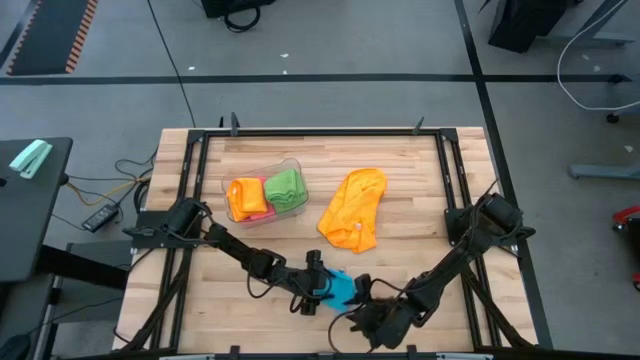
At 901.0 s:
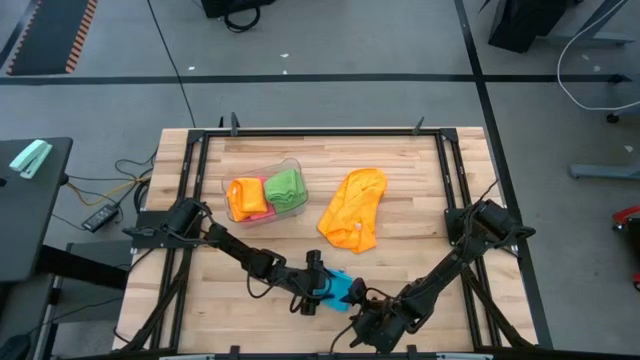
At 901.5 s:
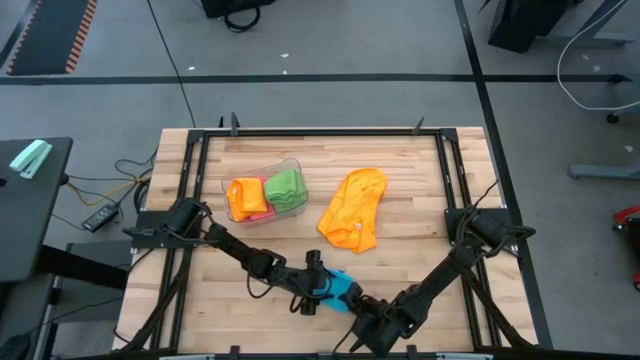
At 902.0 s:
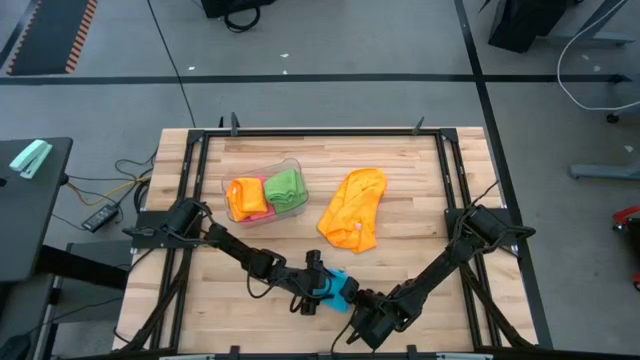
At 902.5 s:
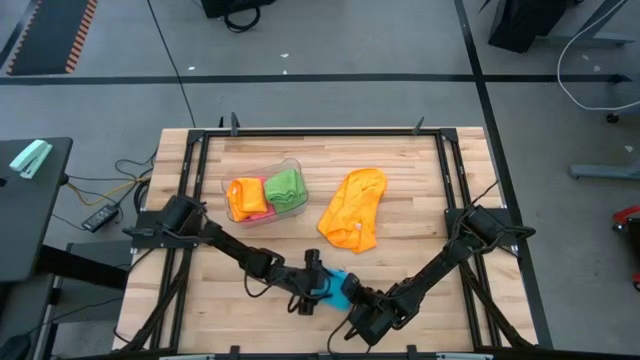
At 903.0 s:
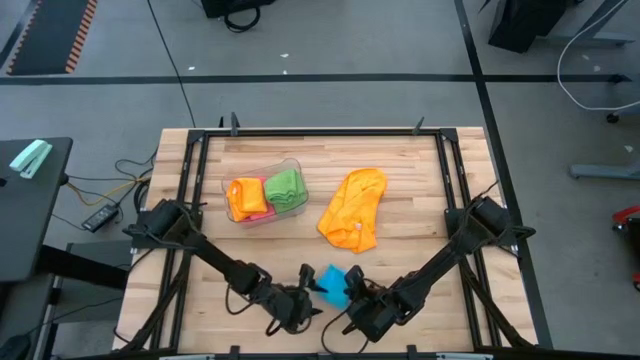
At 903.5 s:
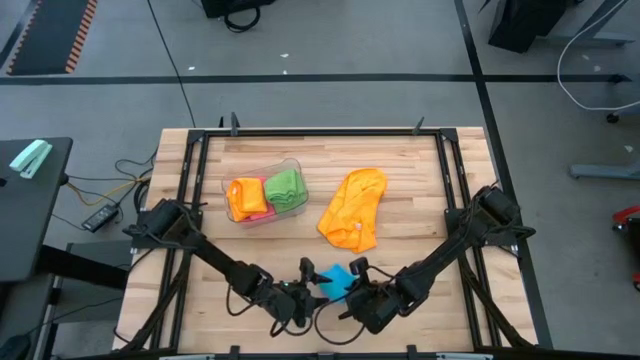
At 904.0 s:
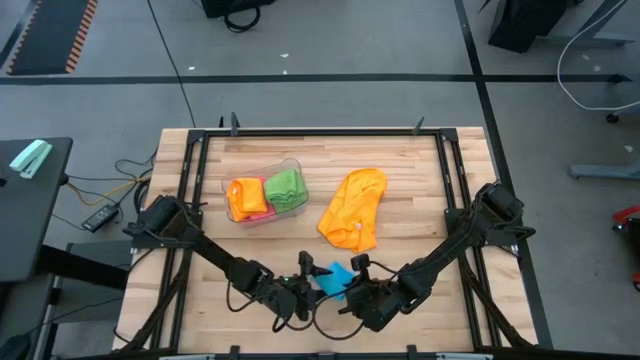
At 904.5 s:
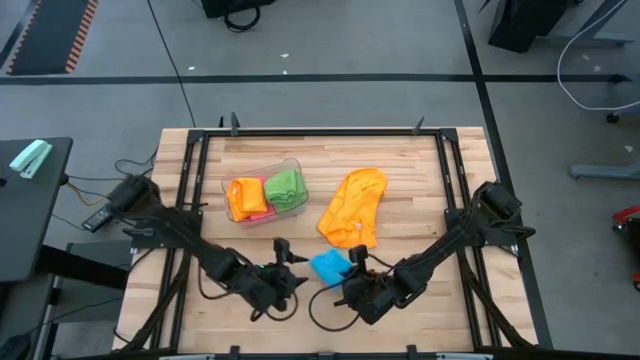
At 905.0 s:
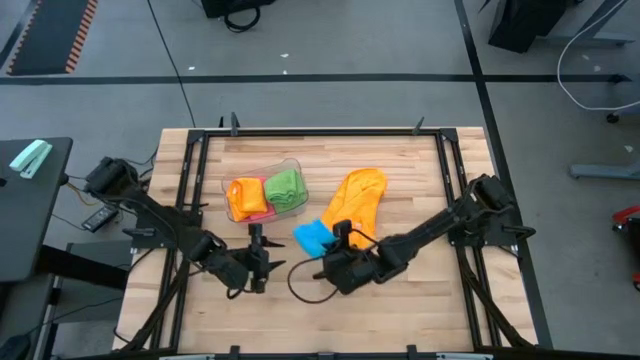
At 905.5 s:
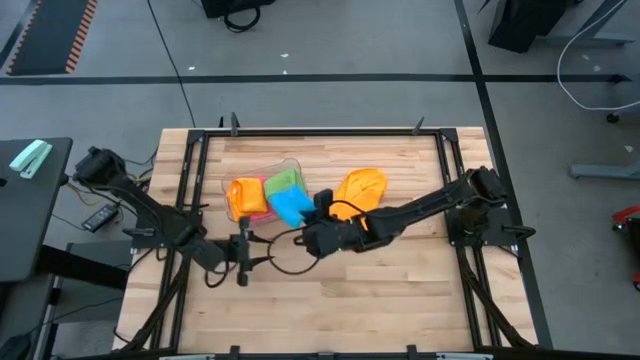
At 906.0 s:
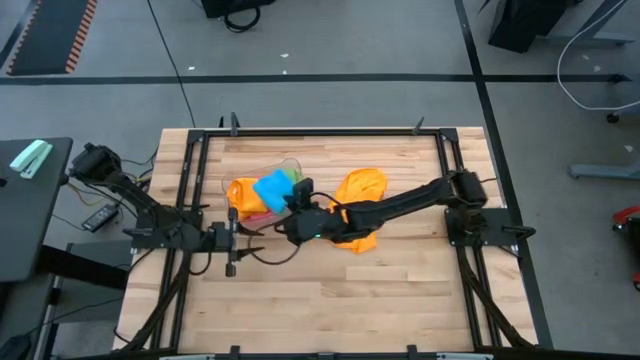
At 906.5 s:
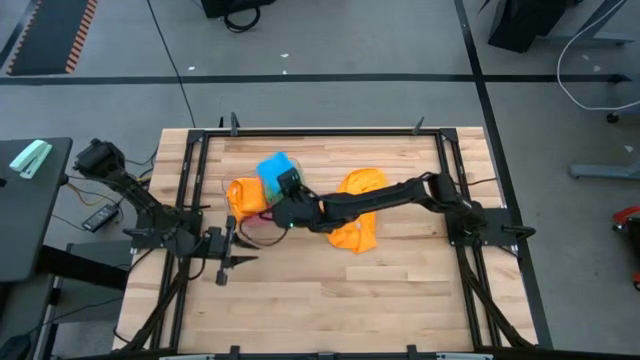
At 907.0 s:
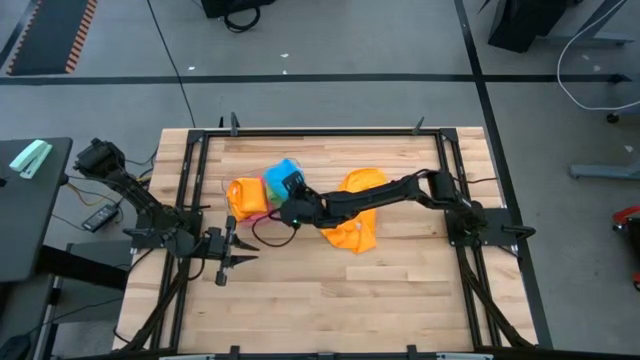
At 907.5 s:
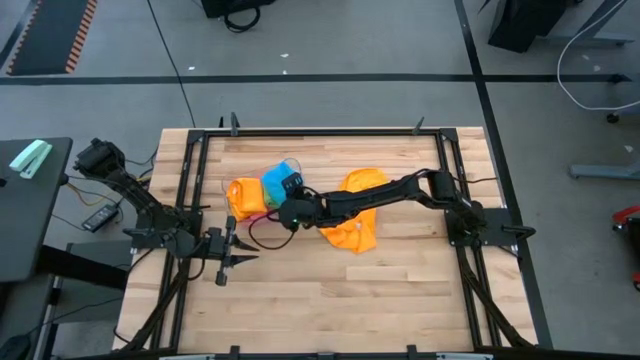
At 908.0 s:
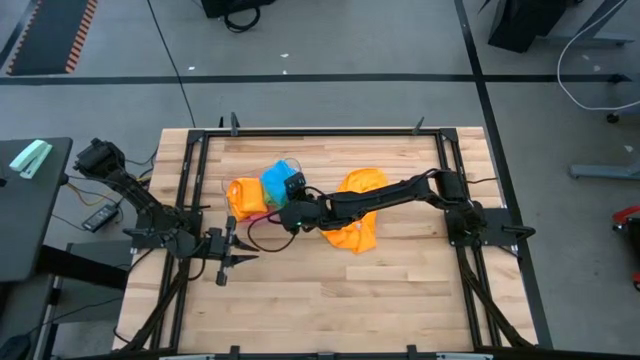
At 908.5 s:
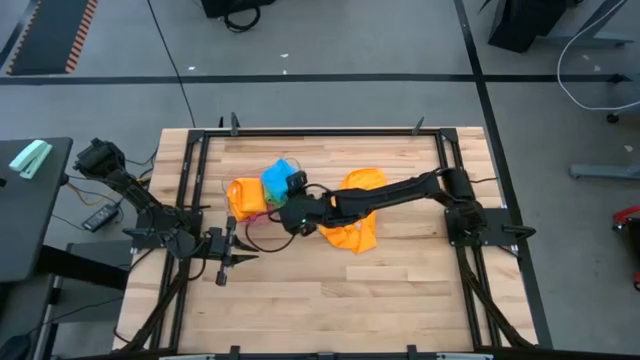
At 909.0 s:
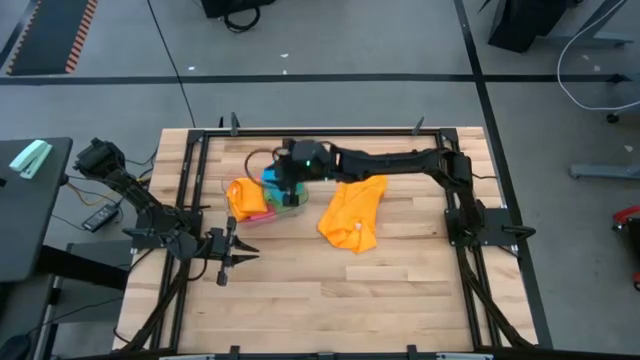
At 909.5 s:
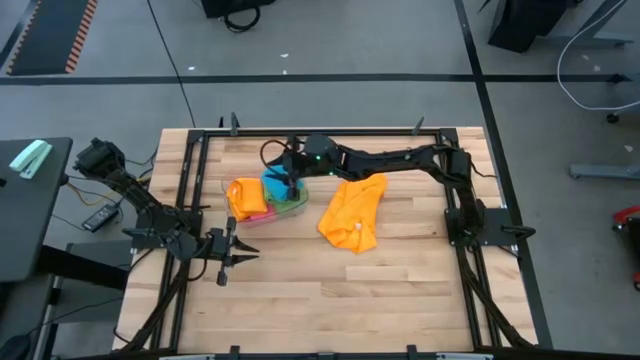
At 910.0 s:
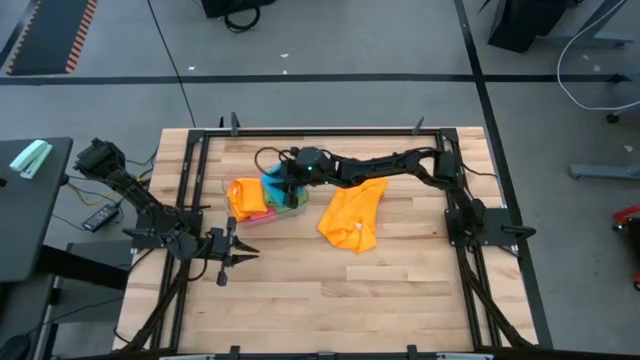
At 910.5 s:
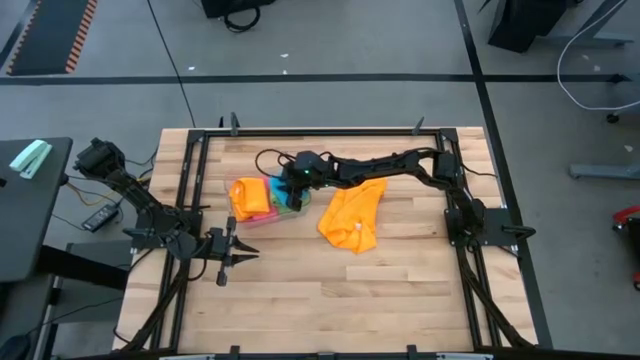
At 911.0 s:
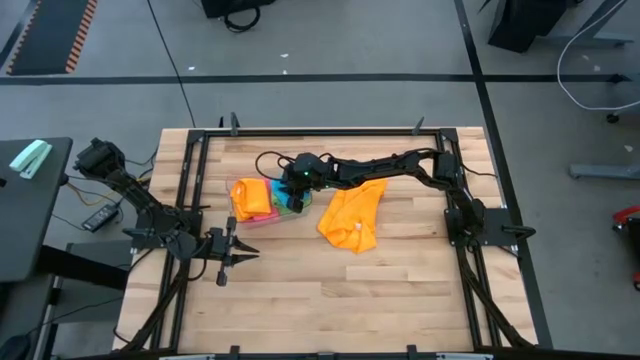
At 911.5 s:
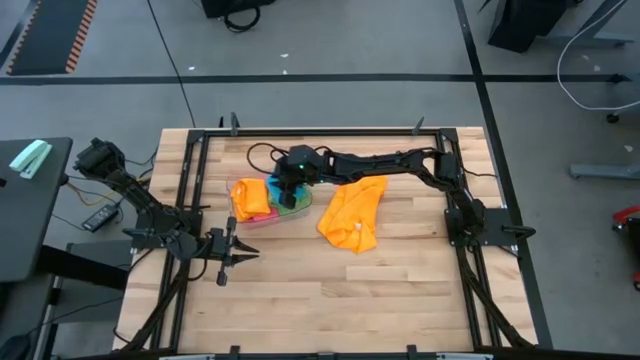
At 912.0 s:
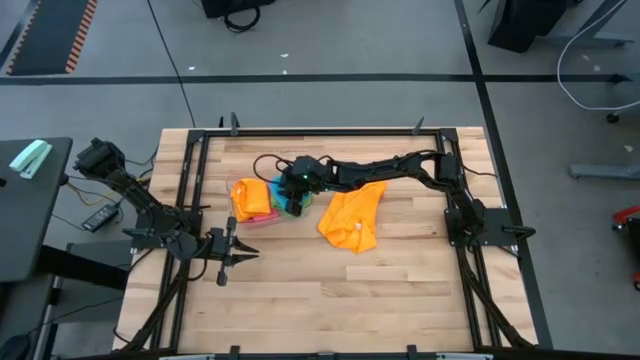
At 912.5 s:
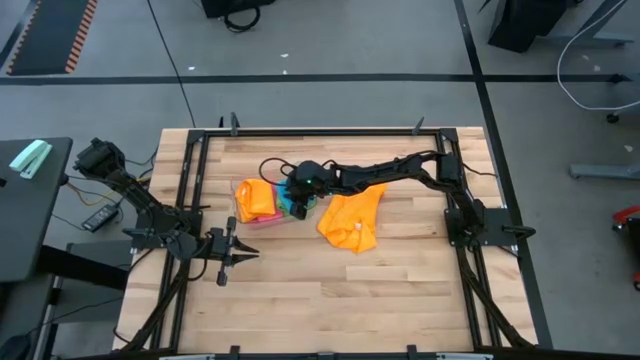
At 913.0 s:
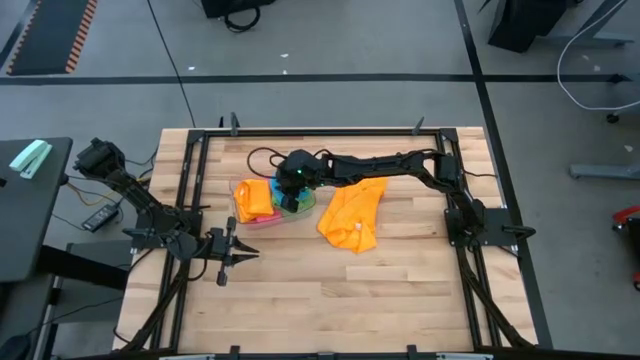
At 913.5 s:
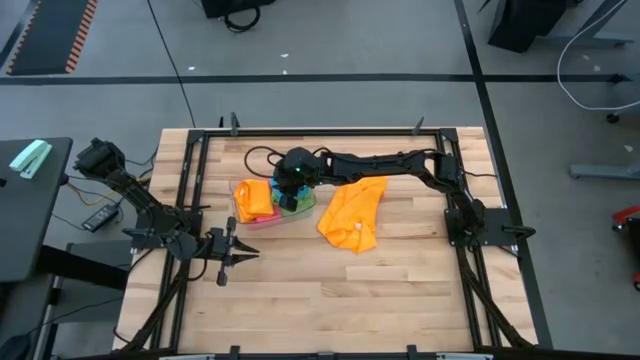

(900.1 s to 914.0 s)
Task: Fold microfiber towels
Put the blue microfiber towel into the transparent bin

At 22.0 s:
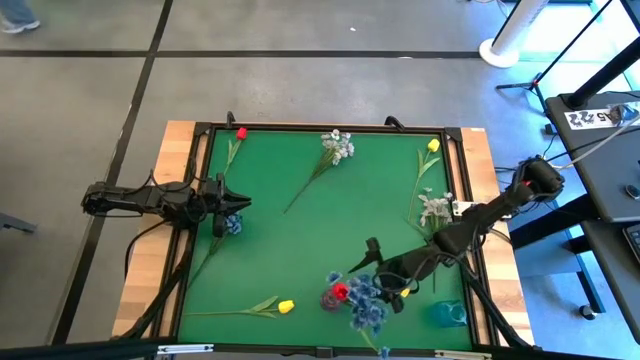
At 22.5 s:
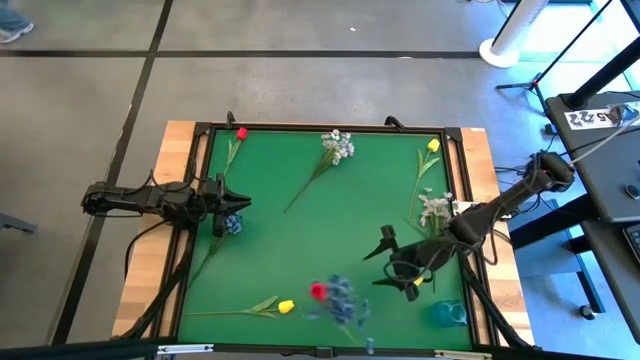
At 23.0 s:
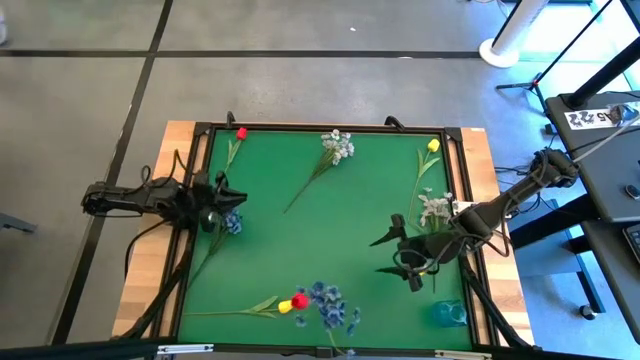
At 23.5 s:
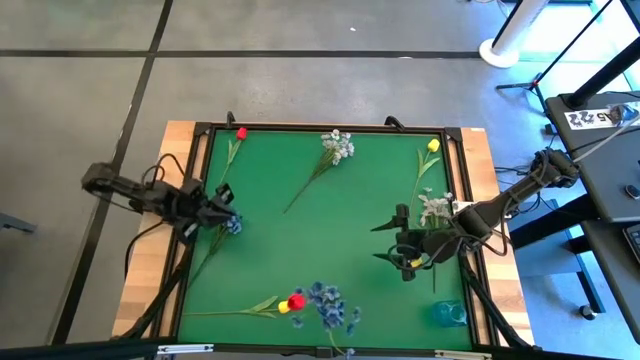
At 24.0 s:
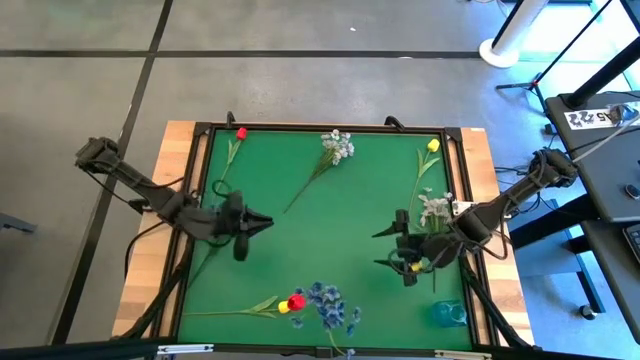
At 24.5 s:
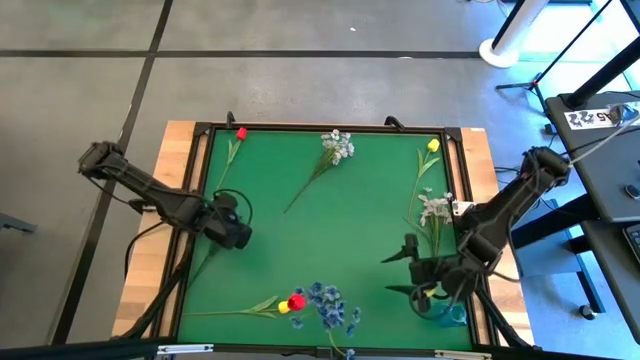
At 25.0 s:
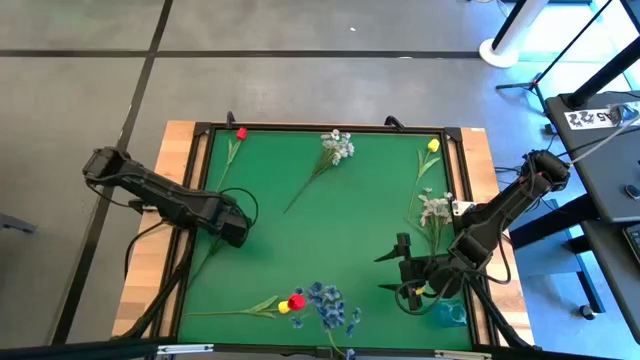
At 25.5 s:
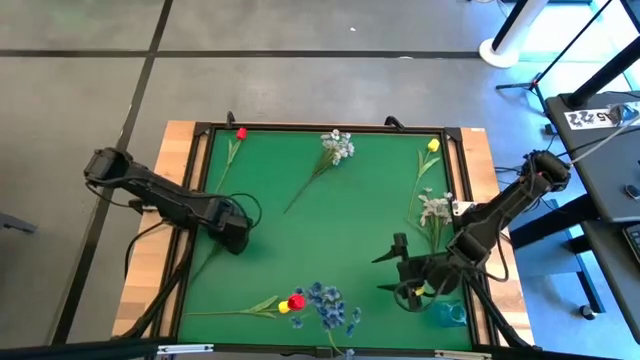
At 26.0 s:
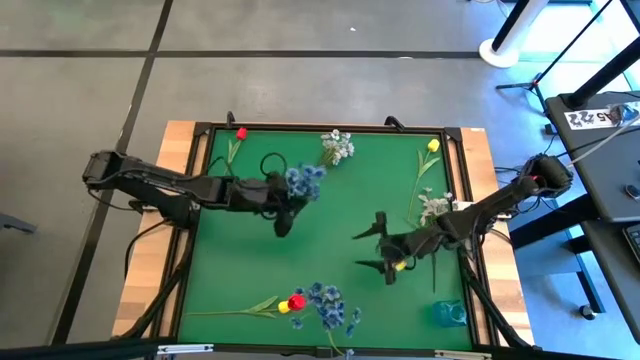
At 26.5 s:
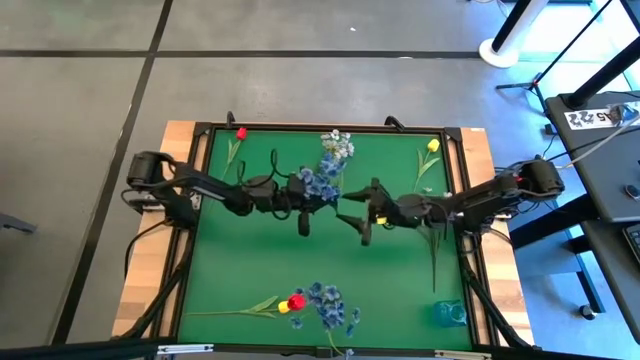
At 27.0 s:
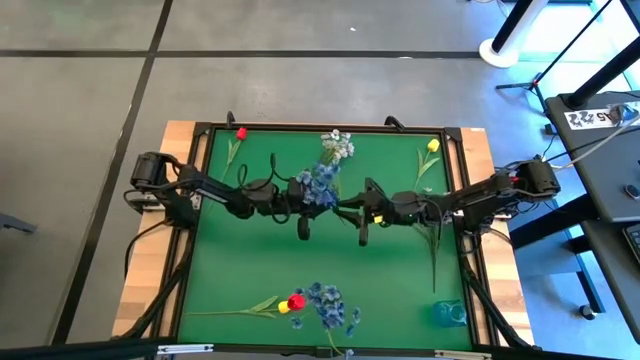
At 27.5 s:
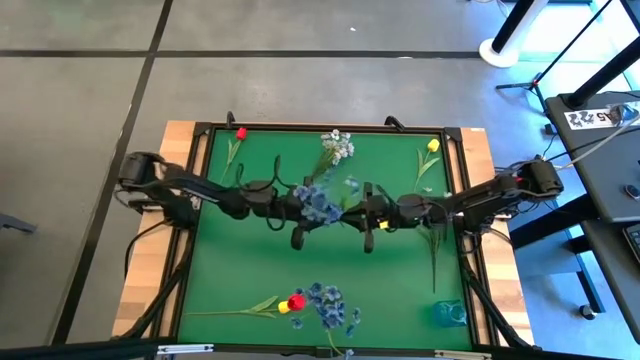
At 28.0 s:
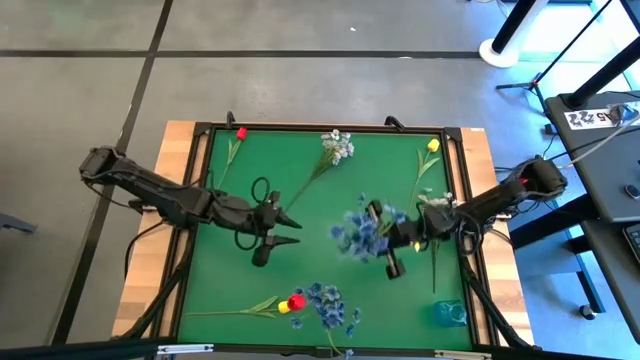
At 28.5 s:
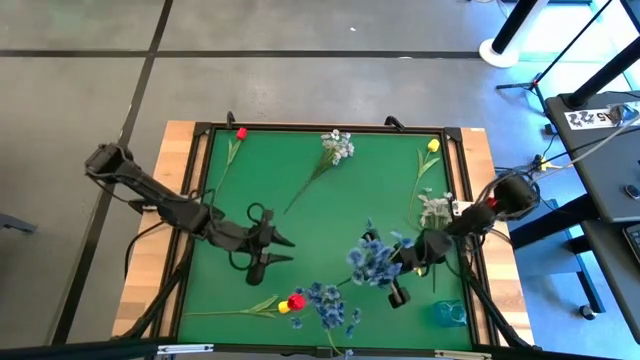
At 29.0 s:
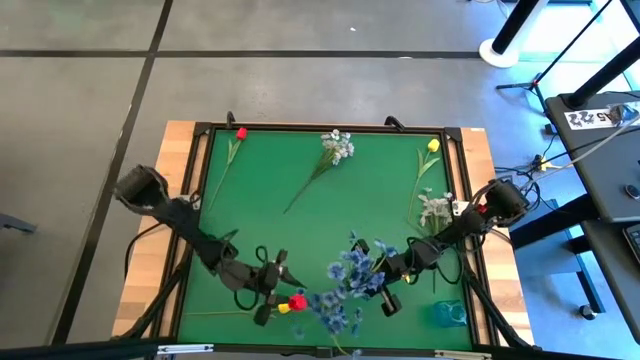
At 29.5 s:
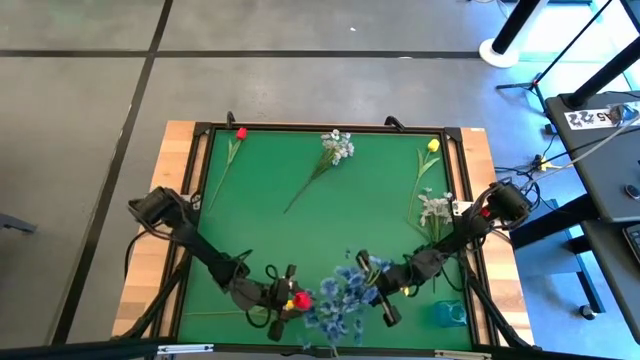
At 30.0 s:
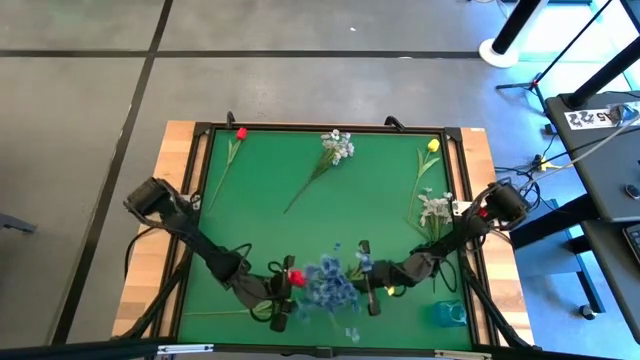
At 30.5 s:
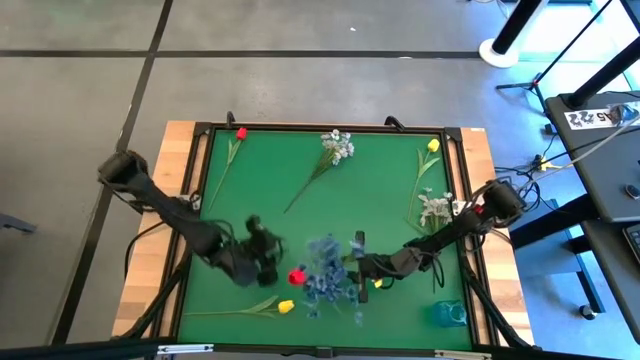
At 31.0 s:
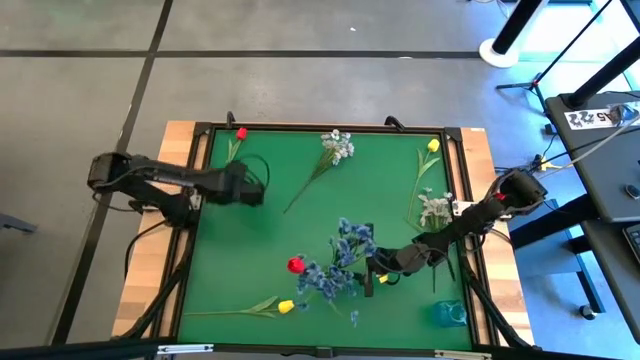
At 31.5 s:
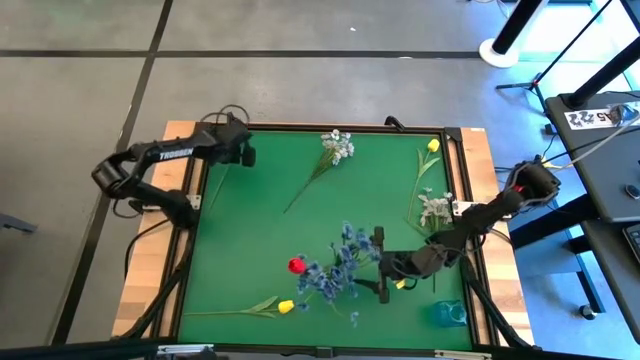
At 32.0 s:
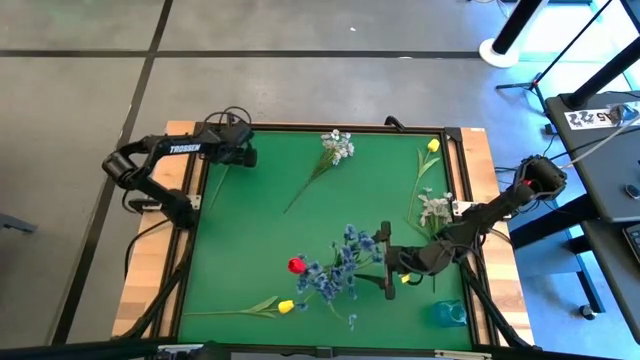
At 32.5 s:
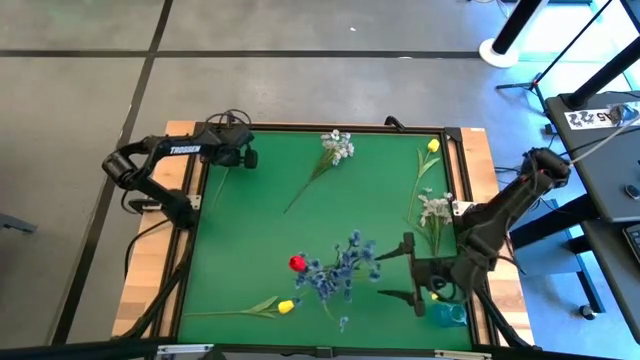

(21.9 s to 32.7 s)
Task: Sort flowers into vase by color
Put the blue flowers into the violet vase
